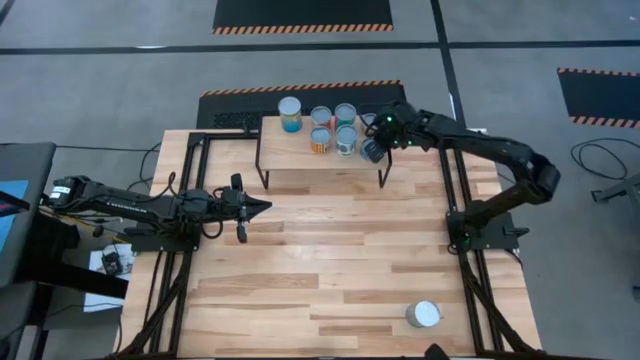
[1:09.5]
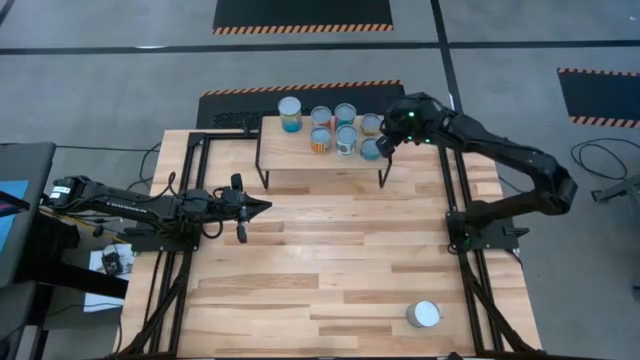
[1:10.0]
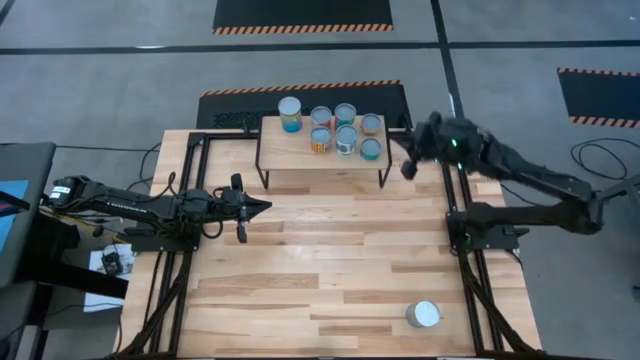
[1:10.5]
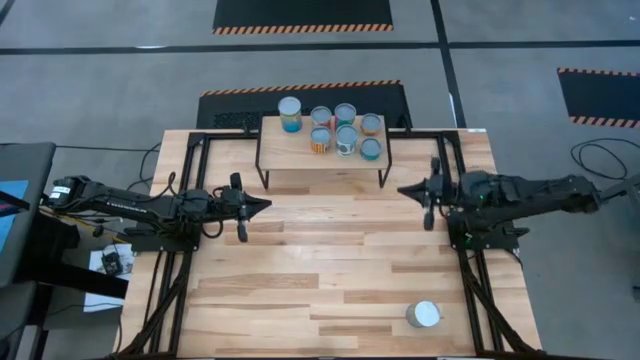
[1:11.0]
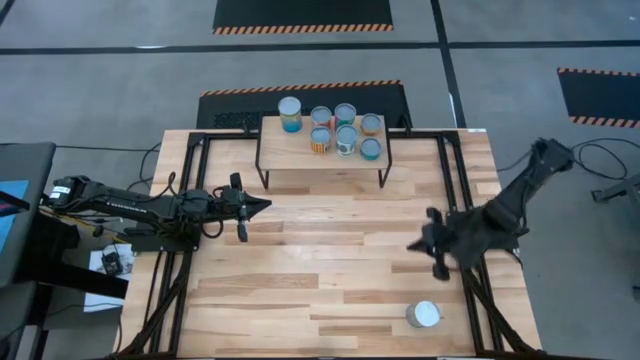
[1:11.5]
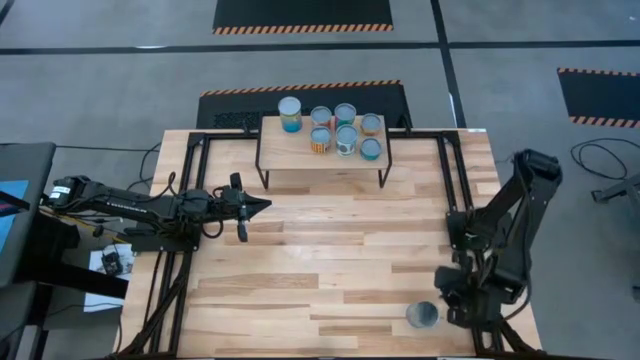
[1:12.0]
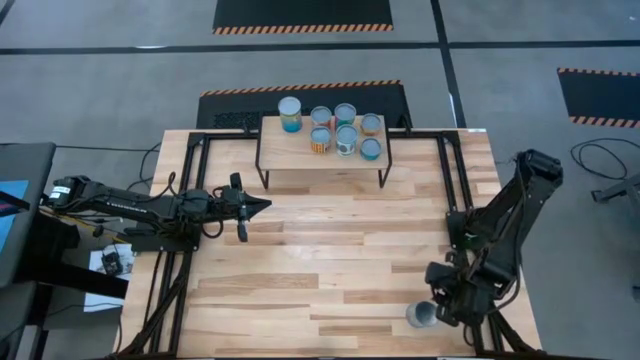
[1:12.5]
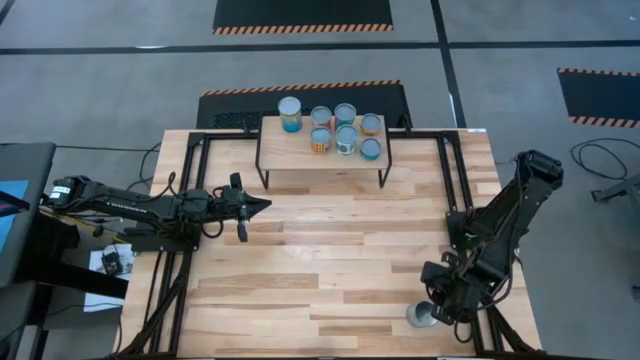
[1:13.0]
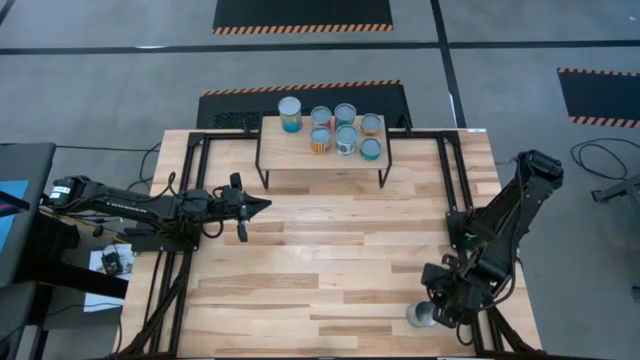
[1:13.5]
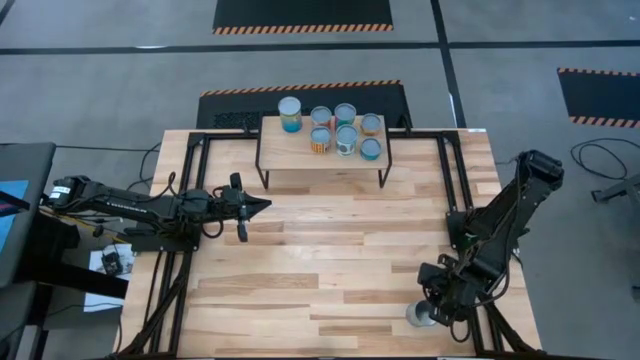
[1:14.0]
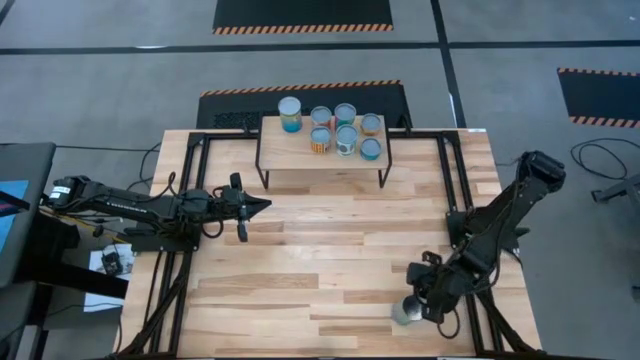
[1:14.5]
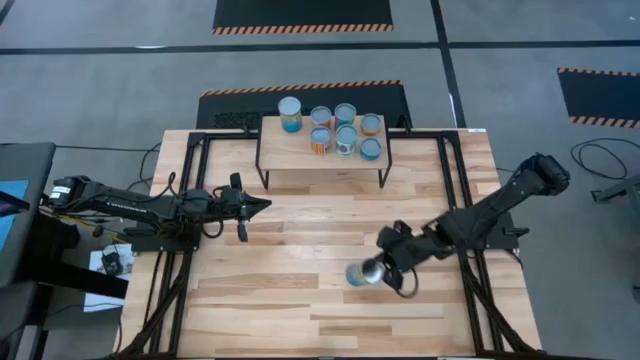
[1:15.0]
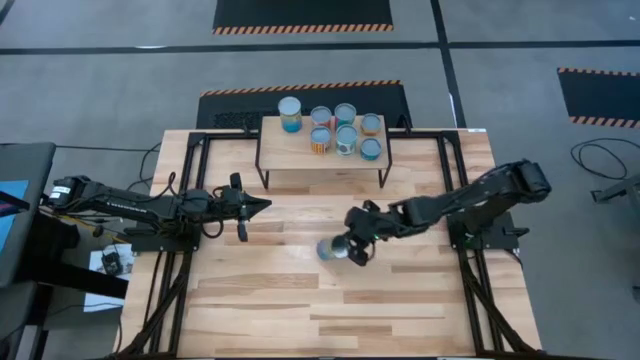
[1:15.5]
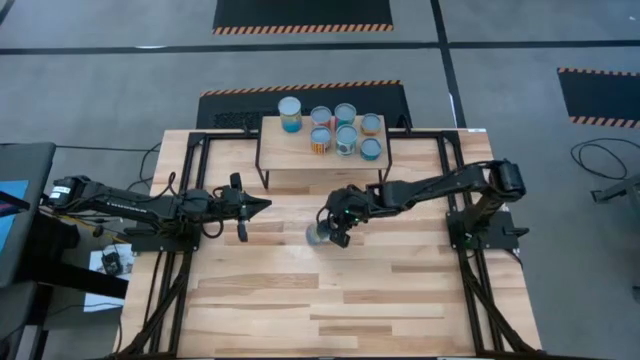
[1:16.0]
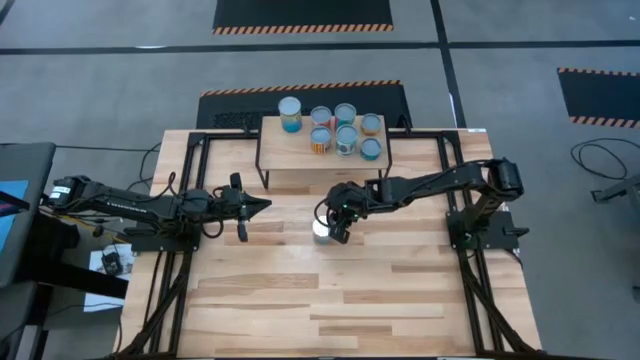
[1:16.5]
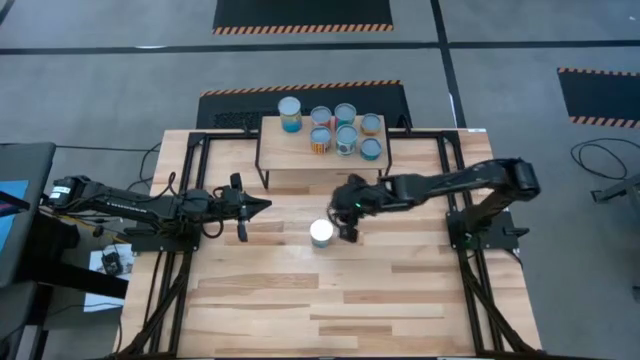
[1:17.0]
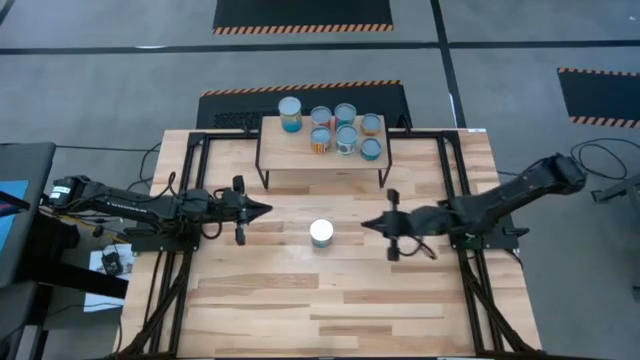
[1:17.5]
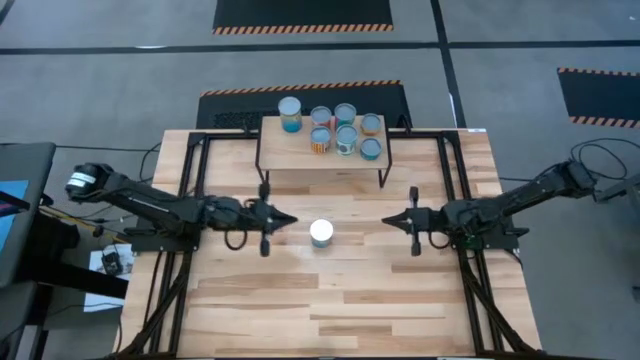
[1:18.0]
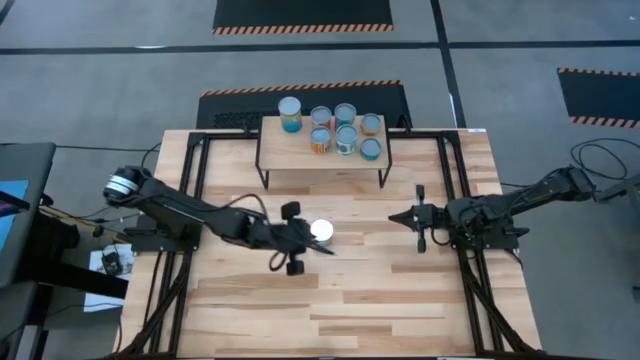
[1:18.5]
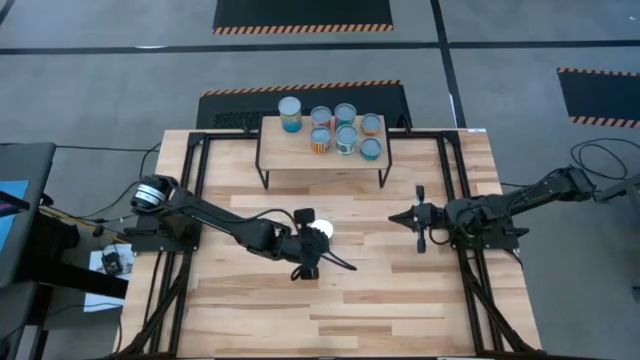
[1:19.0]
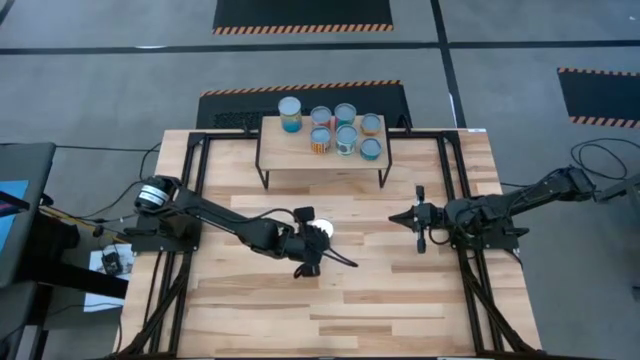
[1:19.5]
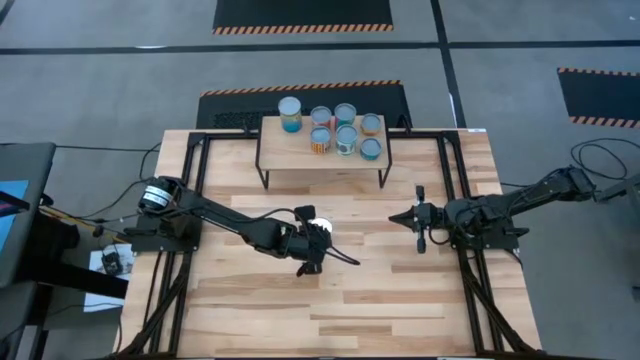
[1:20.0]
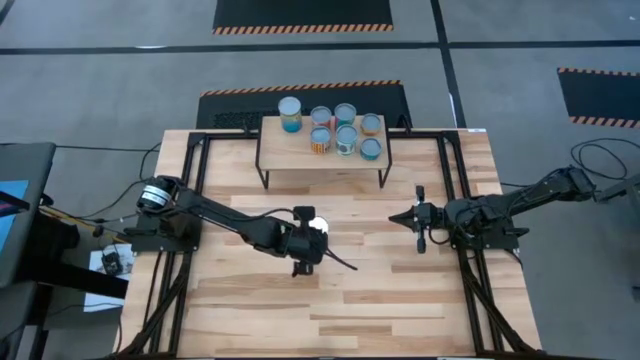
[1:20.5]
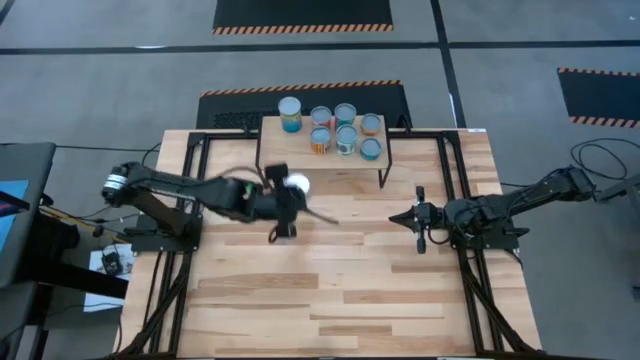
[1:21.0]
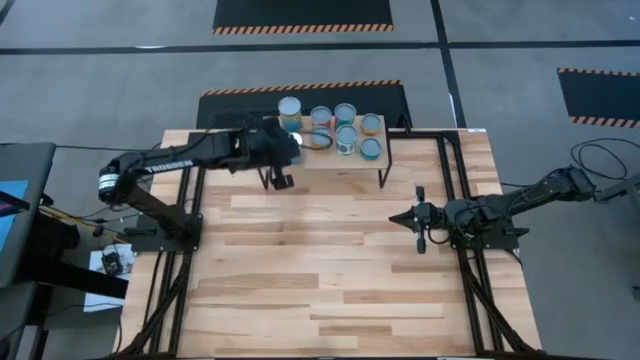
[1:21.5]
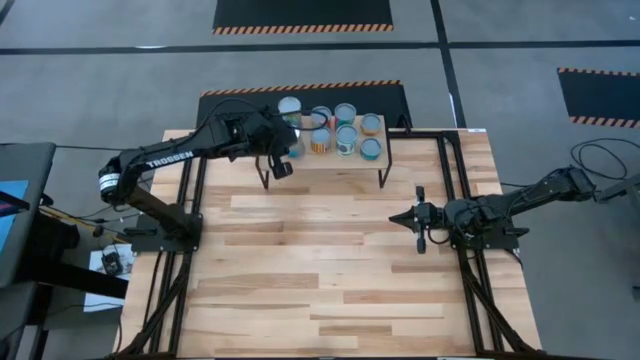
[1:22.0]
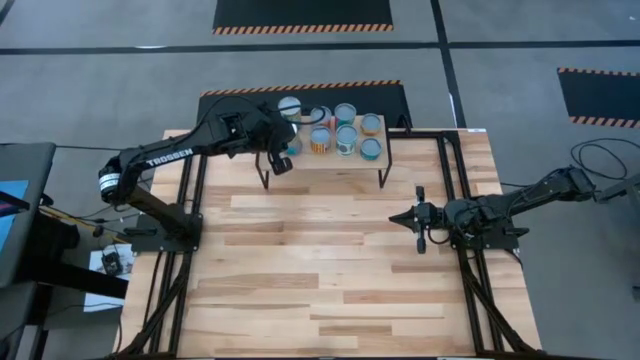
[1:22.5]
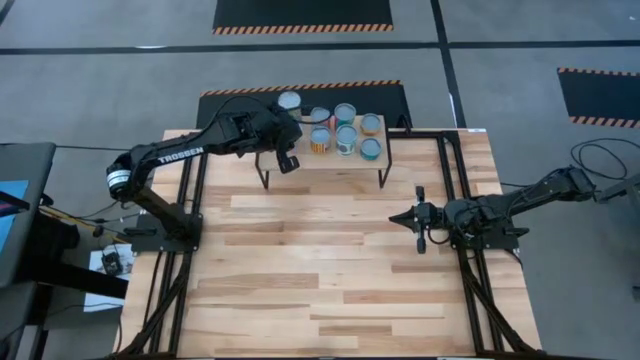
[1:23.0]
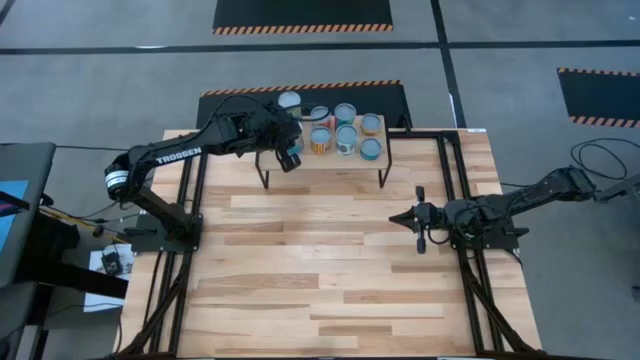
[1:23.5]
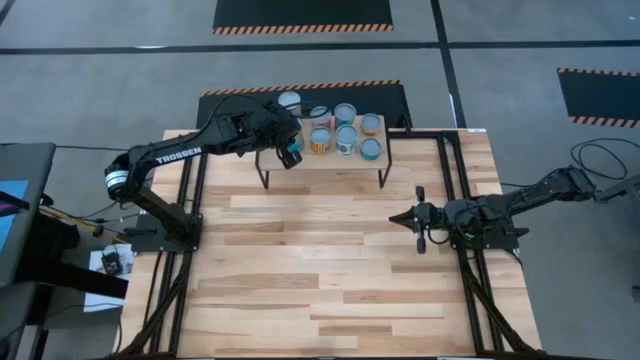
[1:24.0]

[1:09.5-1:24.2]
Task: Pick and place cans onto a shelf
Put the canned cherries on the shelf aligned with the other canned cherries

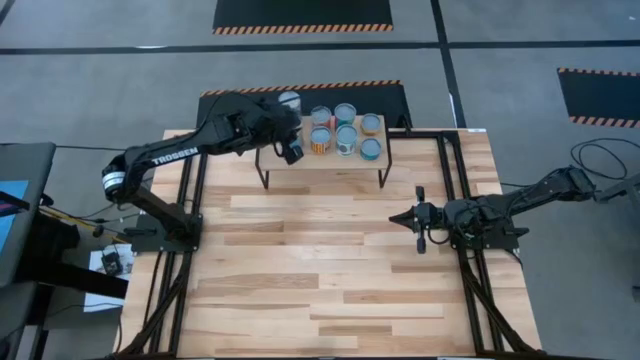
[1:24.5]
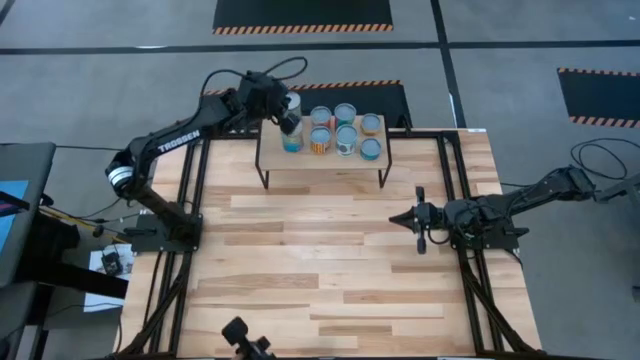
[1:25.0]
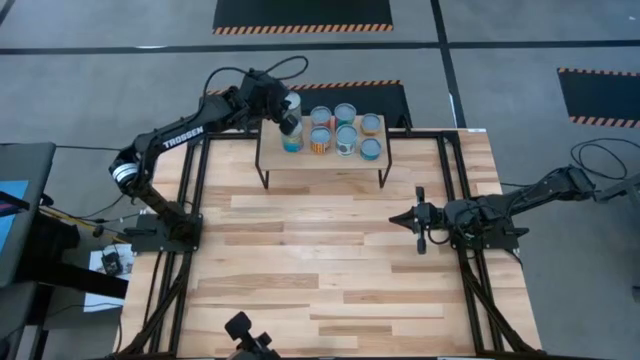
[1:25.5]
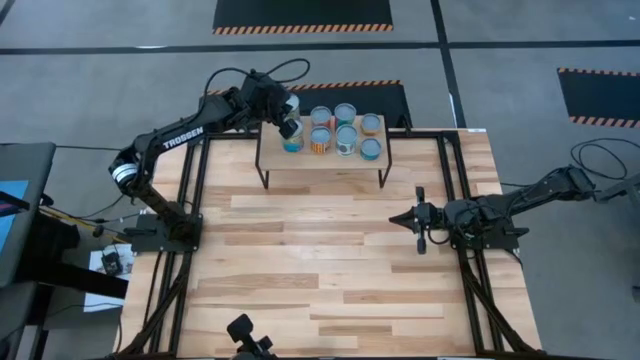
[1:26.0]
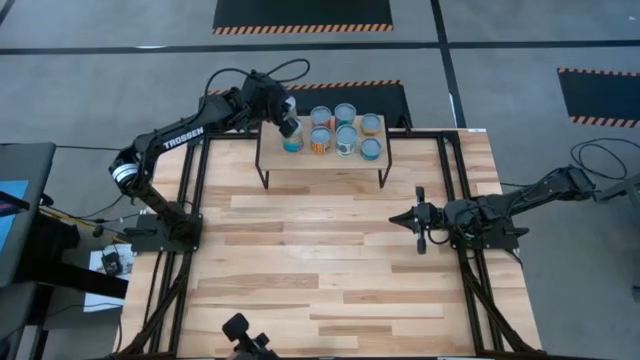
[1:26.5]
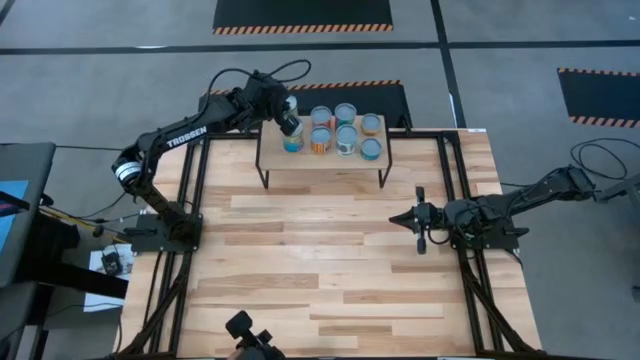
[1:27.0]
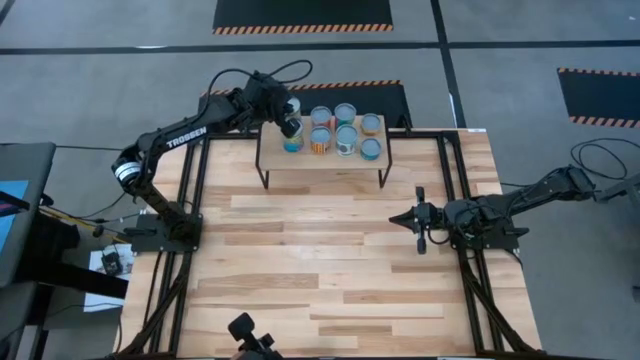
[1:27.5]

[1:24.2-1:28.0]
Adjust the canned cherries on the shelf

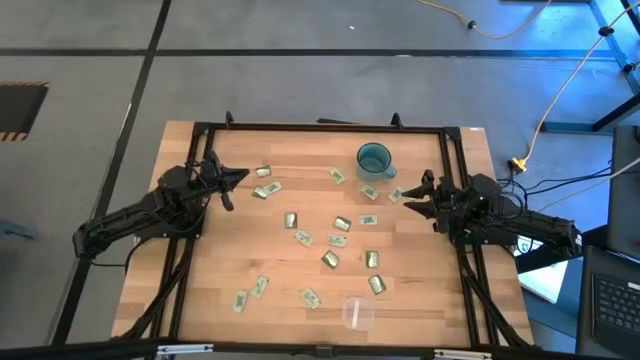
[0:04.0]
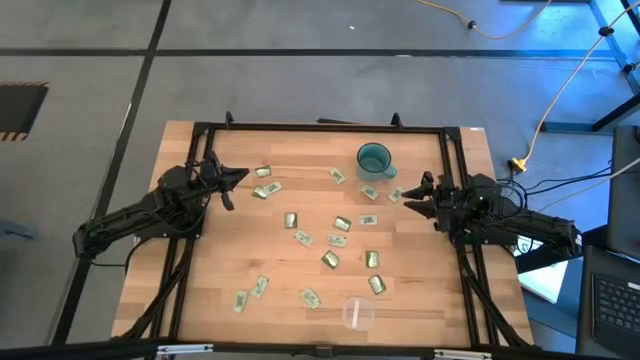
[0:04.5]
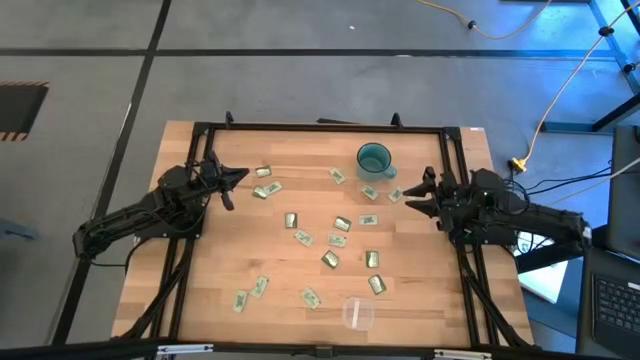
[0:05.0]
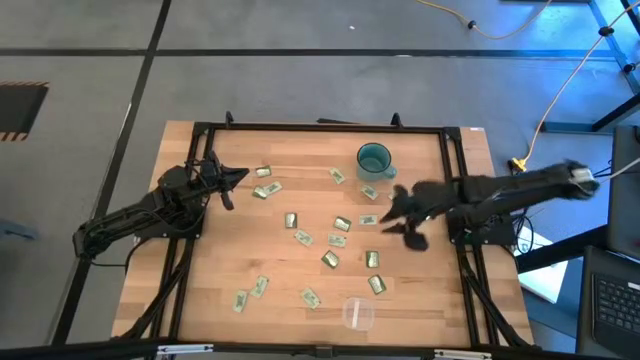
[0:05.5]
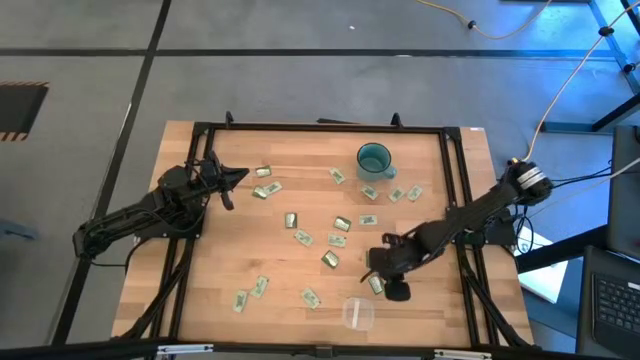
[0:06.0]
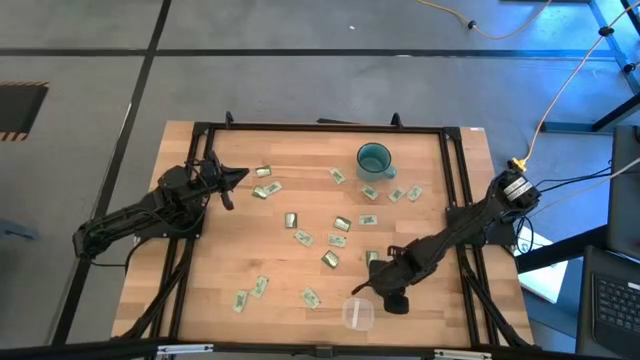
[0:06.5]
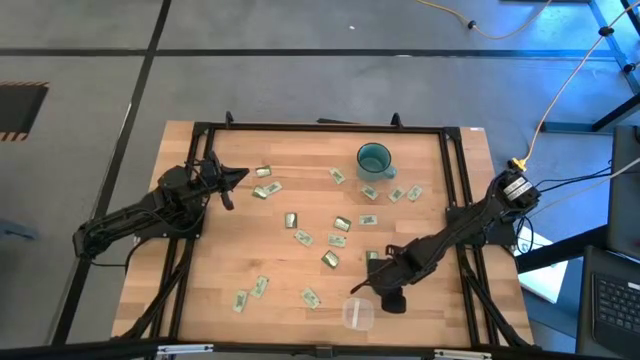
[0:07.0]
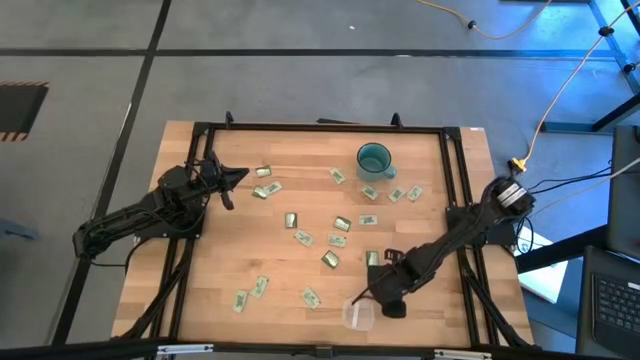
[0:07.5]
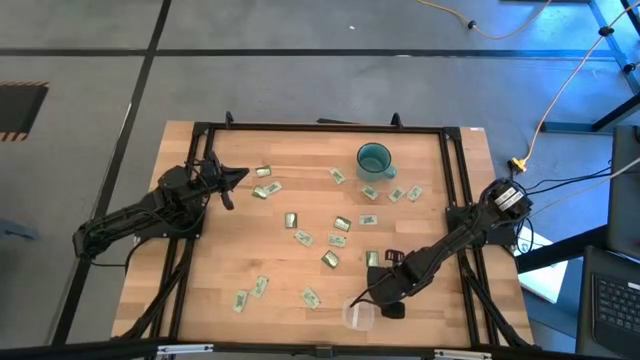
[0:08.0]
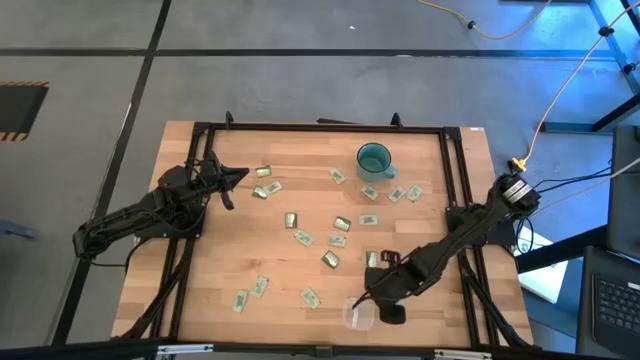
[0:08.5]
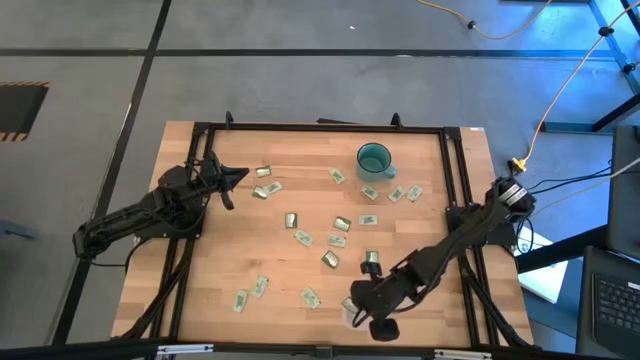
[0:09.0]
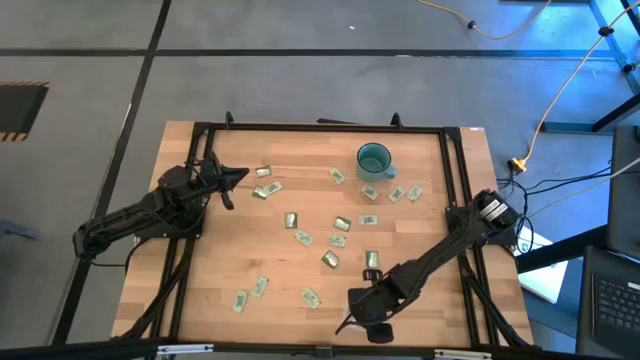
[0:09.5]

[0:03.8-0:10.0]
Task: Pick and place items into bin
Put the green truvia packet into the transparent bin
